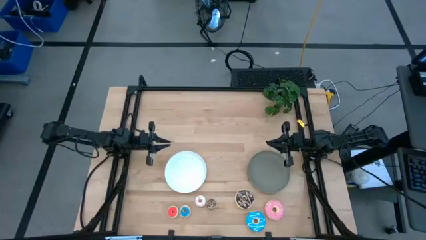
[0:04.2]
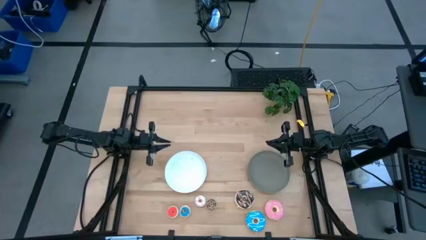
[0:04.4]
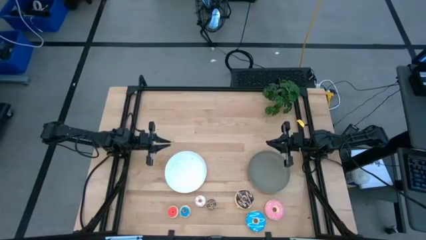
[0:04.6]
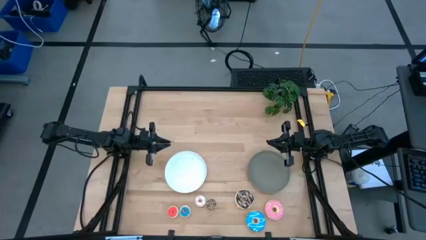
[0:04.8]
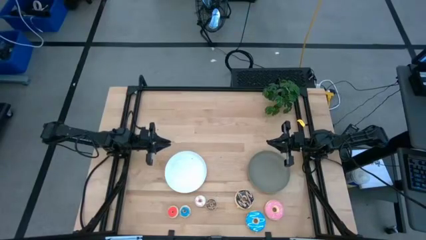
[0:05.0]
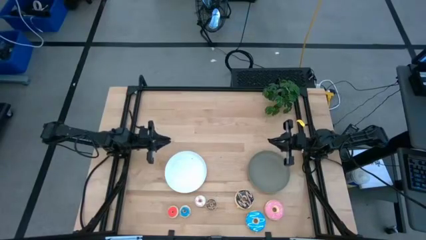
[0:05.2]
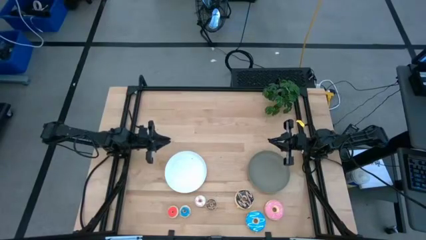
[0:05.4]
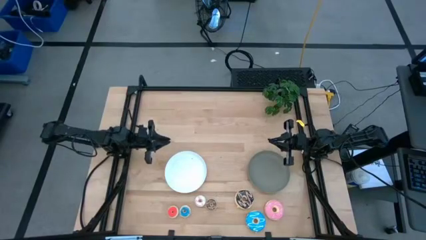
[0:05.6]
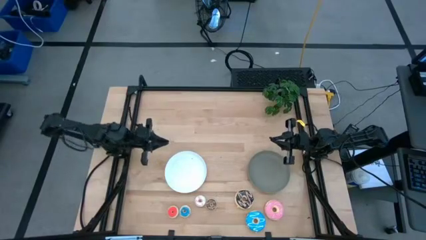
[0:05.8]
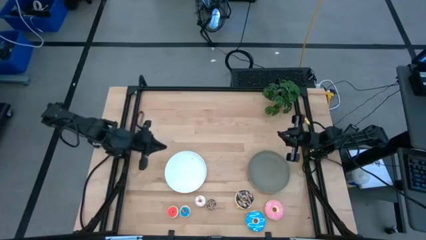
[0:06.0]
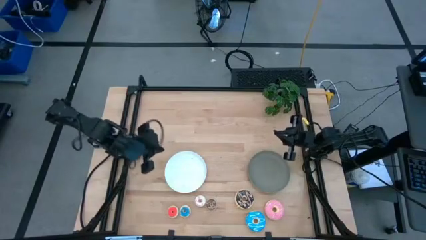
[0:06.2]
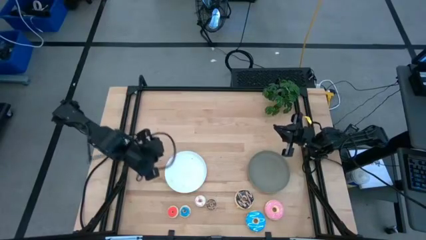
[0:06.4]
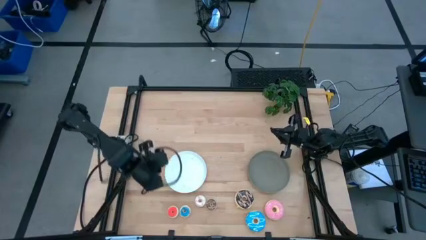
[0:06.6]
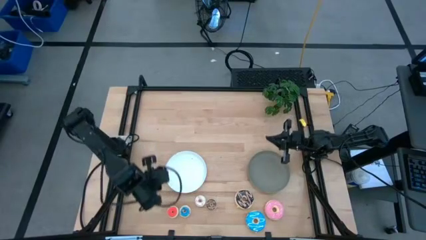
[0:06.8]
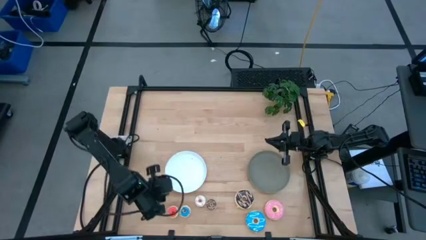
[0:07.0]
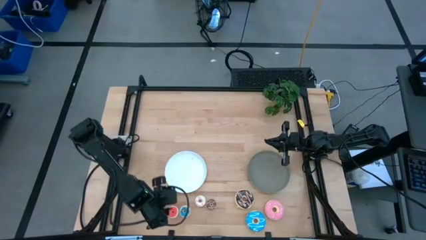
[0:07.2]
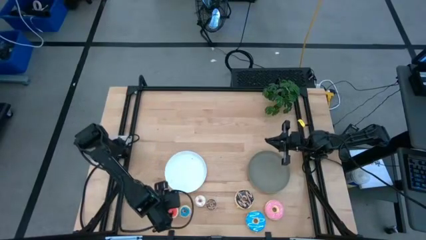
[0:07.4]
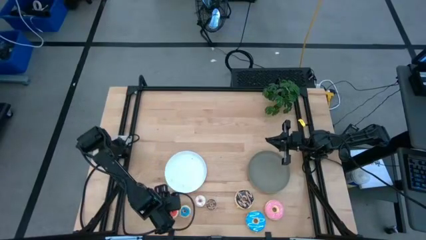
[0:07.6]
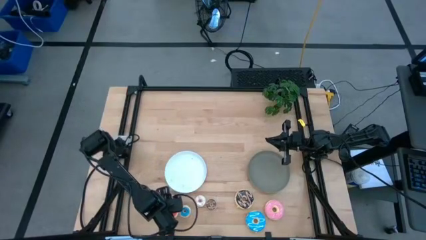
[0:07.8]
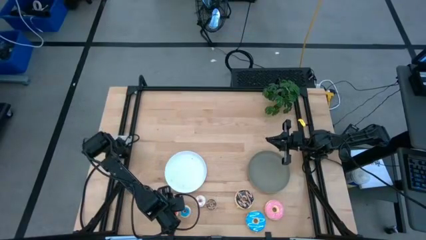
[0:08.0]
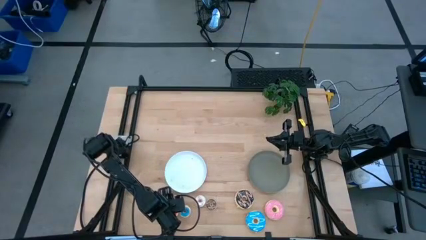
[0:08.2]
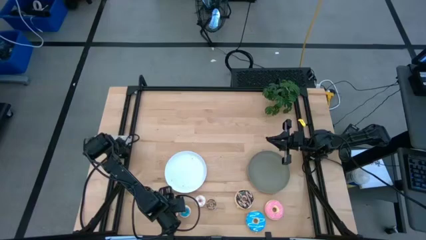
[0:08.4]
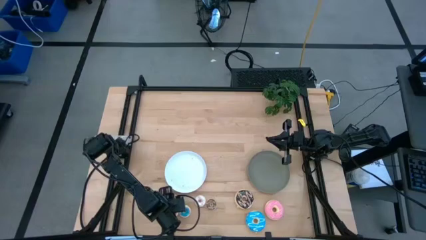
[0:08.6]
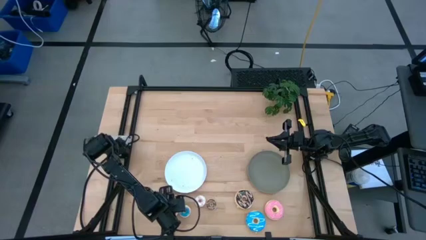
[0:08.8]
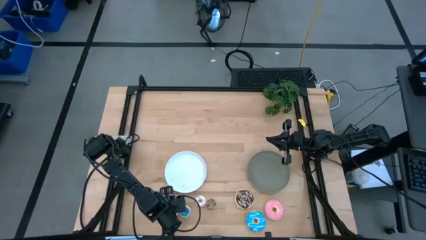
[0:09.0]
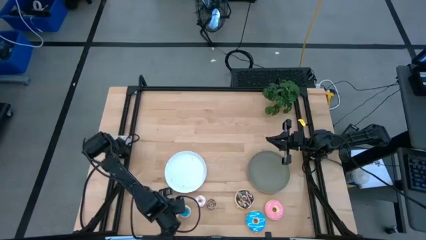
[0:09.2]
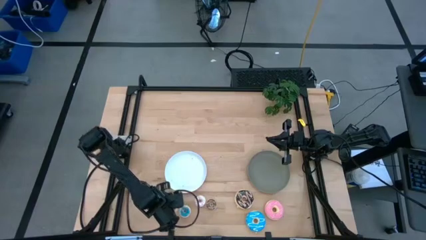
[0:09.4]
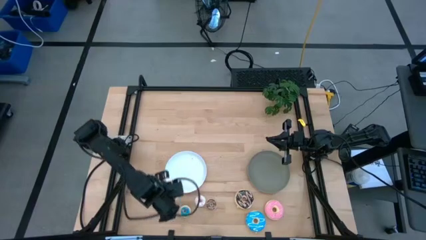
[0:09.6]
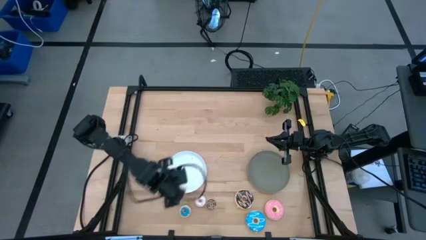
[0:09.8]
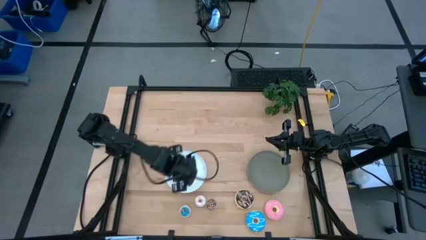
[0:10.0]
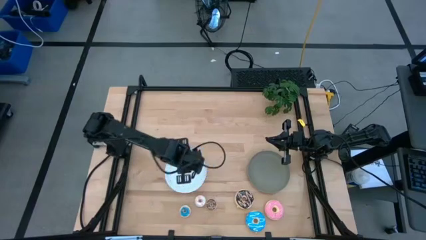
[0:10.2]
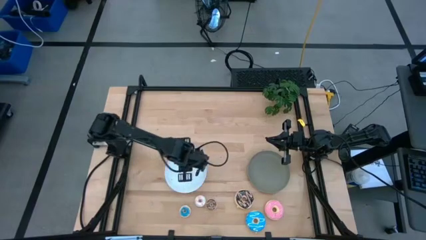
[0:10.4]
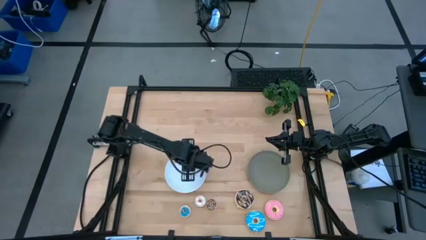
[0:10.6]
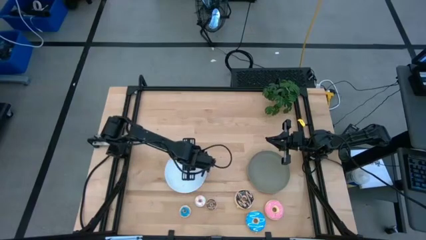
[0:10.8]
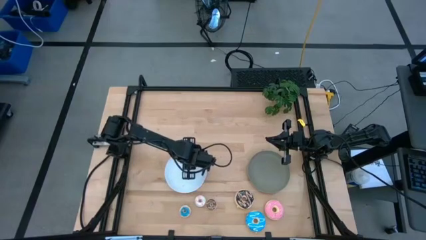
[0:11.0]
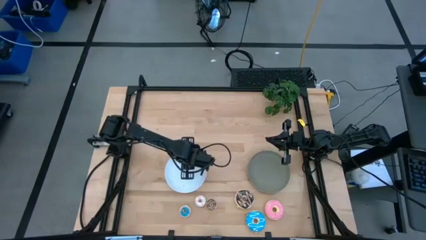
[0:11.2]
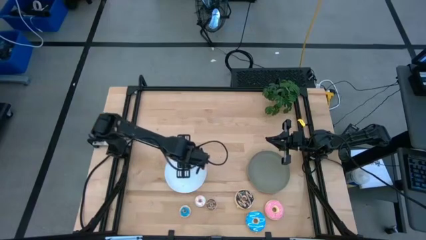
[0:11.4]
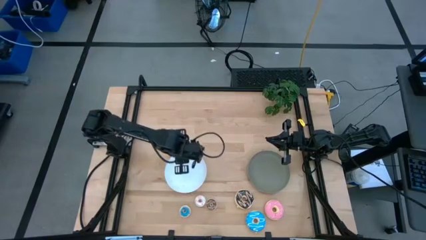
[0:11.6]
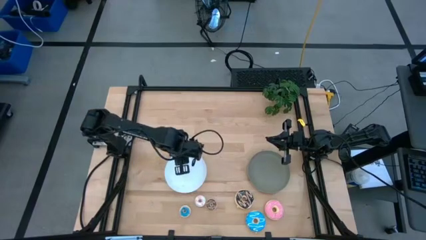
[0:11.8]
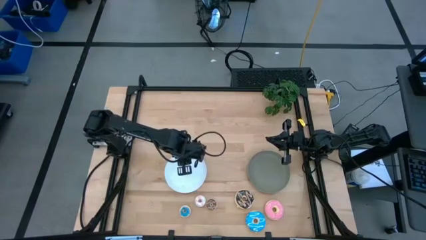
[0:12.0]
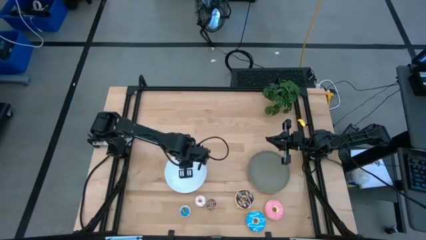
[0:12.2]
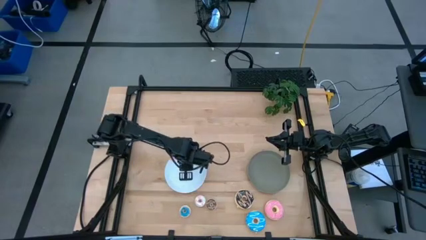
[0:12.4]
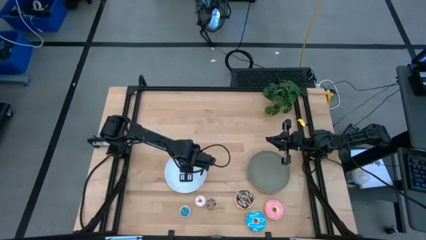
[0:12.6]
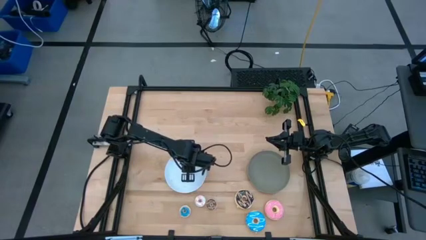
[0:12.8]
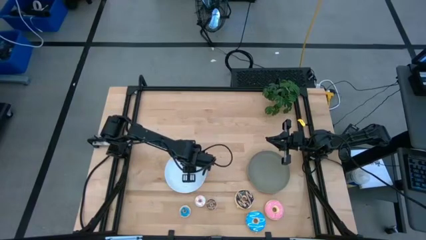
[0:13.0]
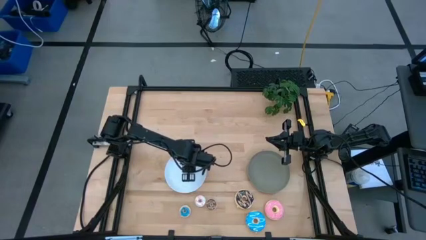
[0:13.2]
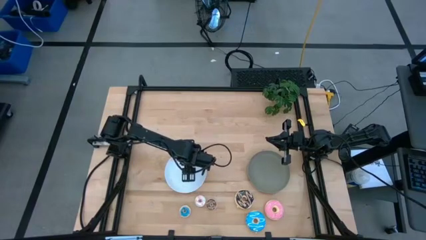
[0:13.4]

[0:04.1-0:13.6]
Task: Pick & Place donuts
Put the small red donut on the white plate

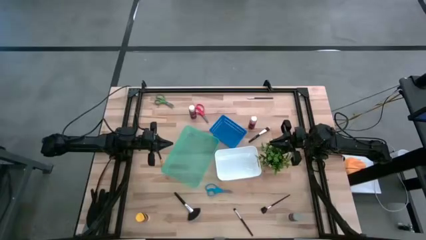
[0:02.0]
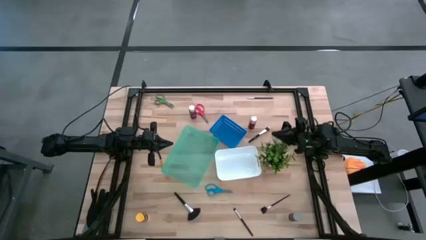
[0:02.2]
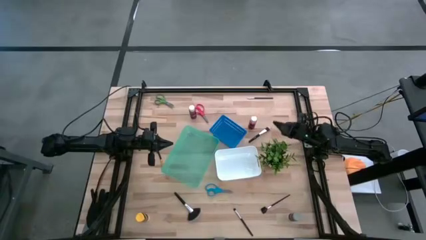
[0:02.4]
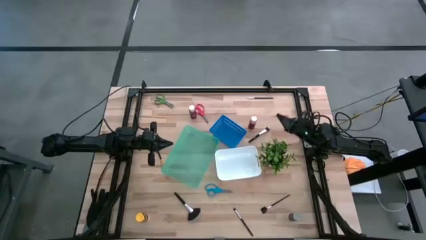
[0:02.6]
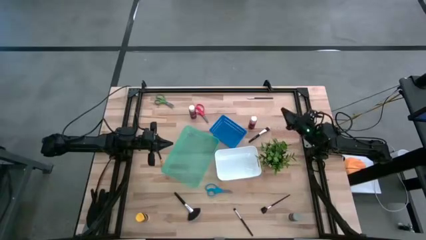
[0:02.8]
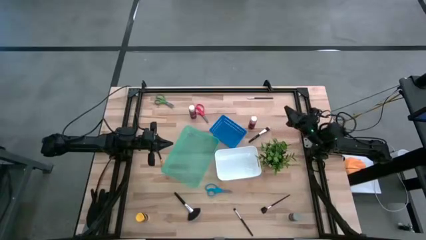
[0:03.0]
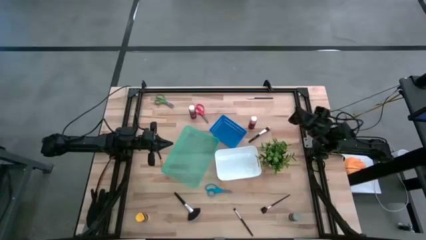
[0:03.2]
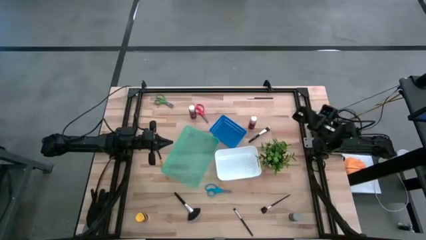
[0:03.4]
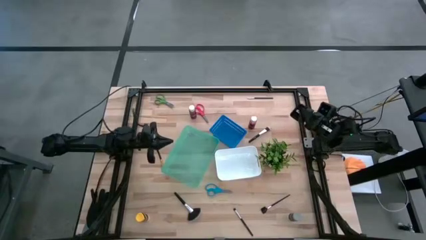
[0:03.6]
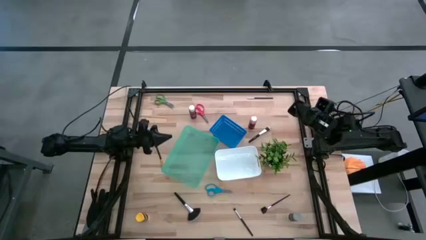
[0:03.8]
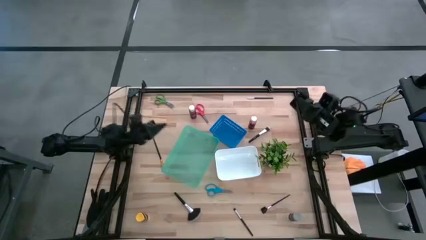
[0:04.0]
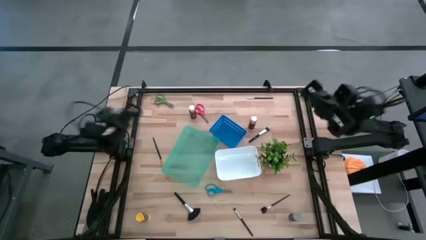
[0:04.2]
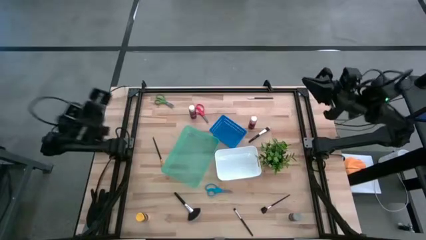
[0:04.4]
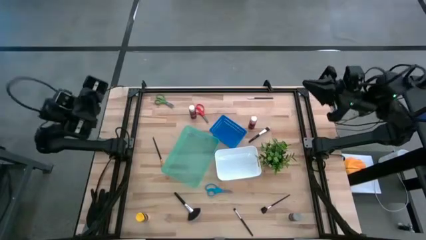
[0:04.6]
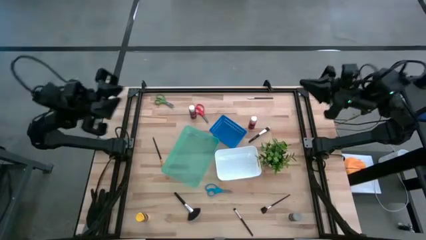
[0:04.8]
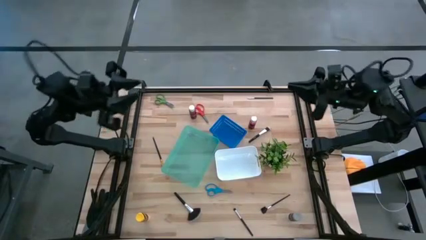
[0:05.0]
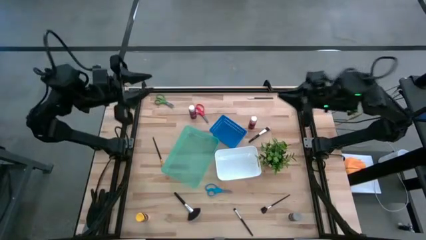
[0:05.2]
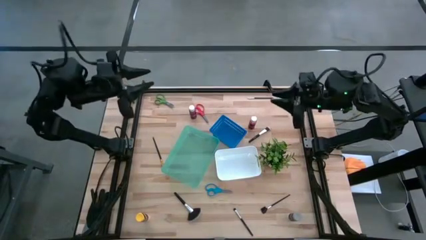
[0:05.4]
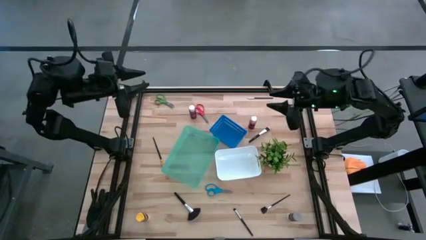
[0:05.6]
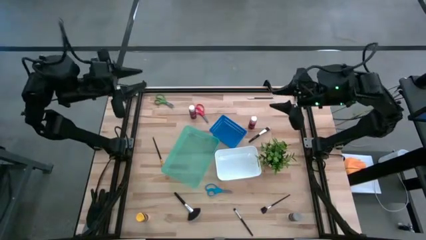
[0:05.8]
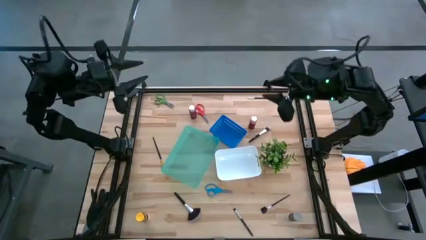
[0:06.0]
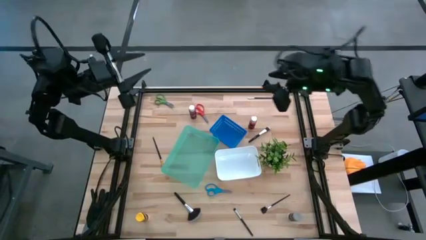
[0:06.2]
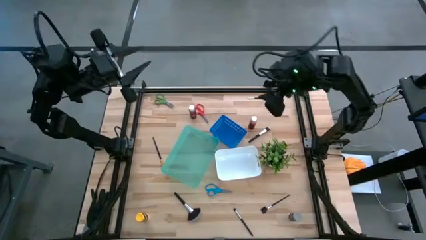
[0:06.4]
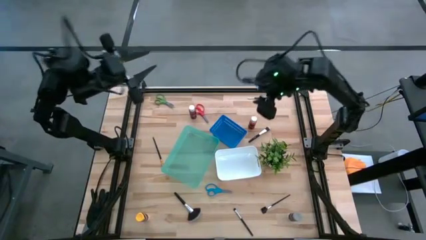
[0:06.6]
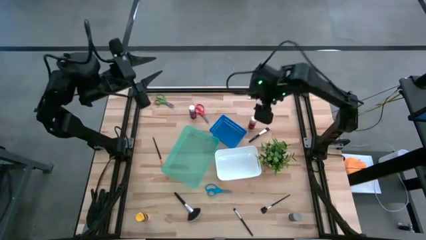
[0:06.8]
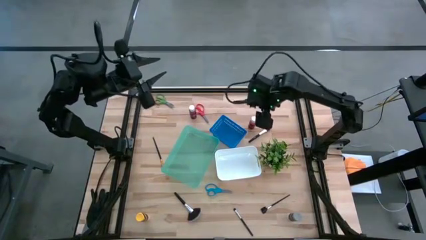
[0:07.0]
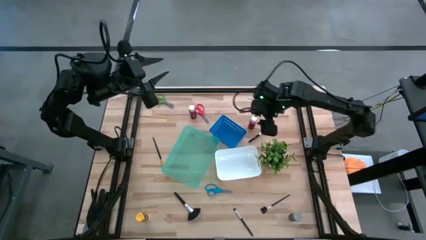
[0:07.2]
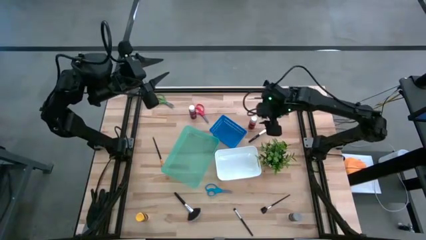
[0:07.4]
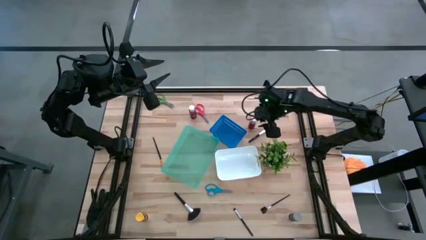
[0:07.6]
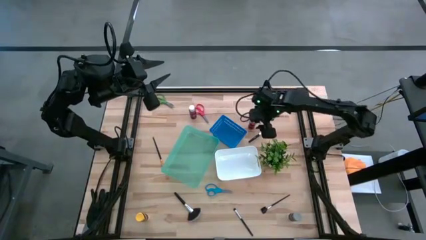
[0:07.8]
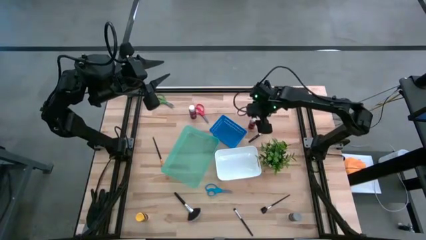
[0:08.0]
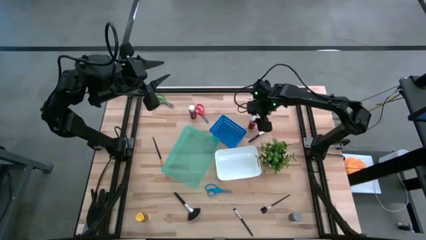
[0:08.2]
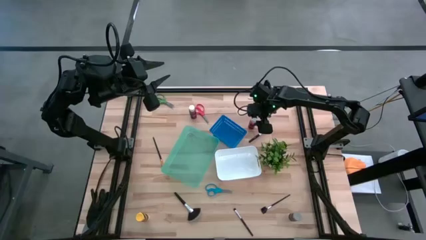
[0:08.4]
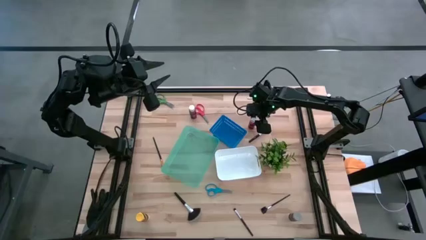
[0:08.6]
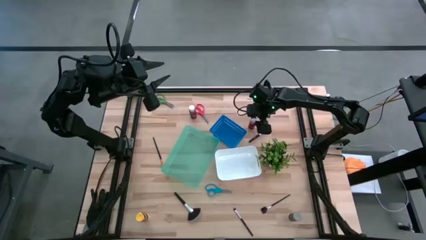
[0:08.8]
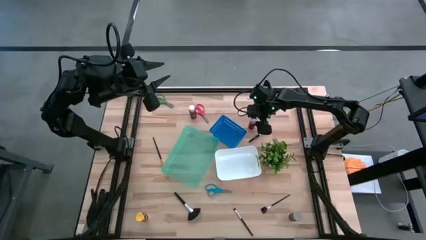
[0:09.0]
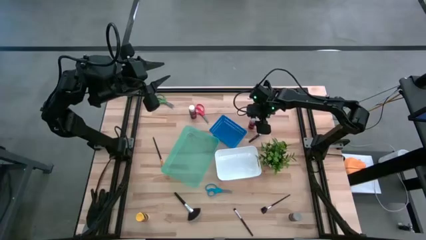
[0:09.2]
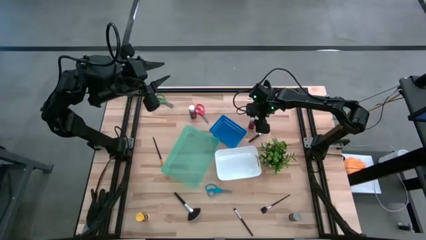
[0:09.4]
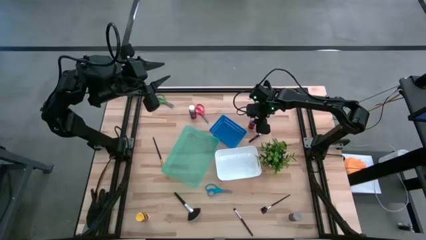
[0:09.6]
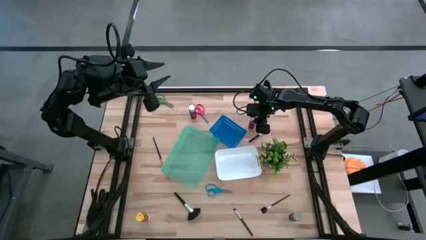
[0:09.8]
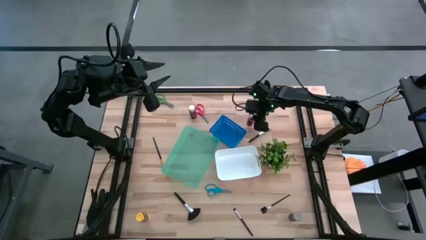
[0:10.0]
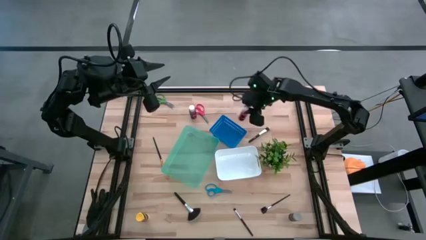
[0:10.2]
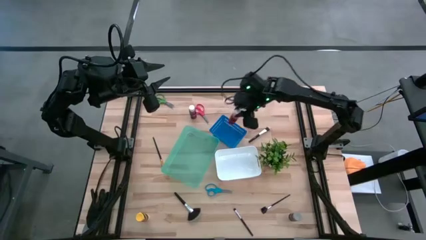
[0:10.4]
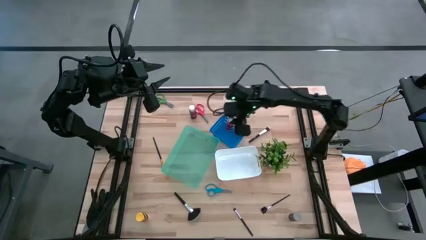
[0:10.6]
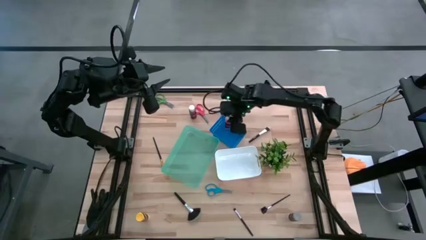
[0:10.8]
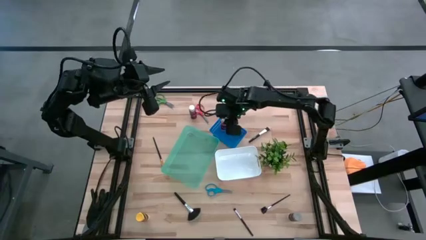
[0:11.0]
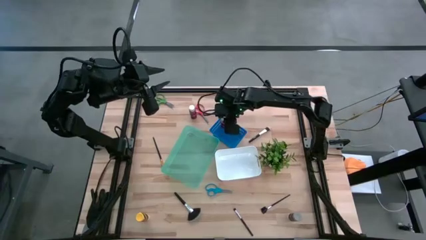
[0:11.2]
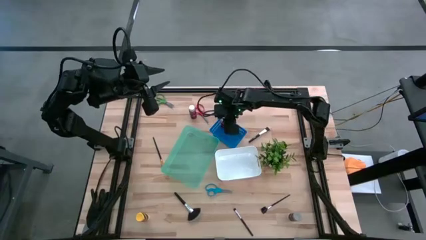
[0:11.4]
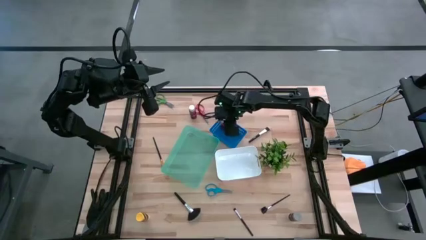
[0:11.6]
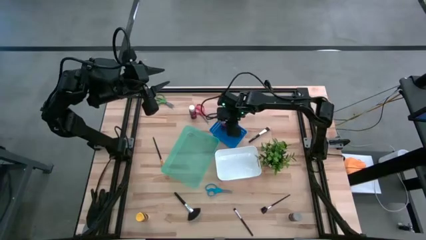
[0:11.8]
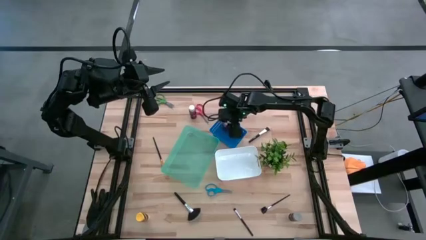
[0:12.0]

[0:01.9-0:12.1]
Task: Pick & Place Paint Supplies
Put the orange paint bottle into the blue bin
